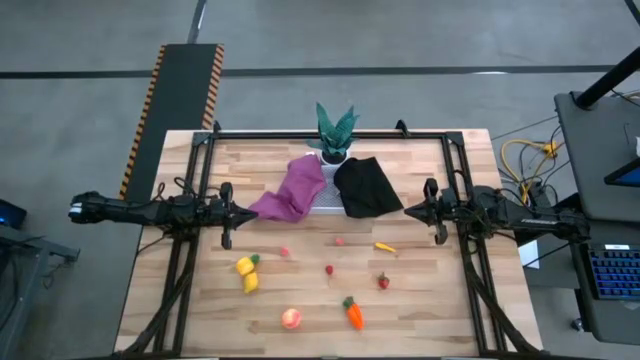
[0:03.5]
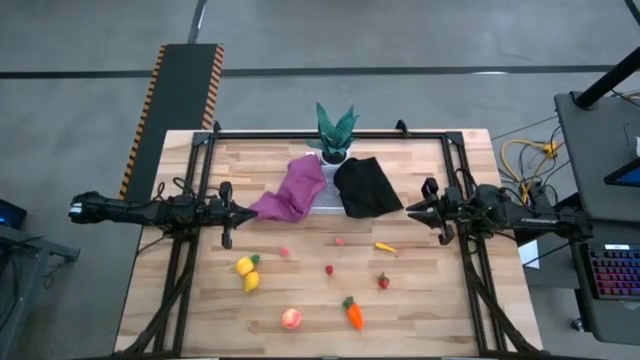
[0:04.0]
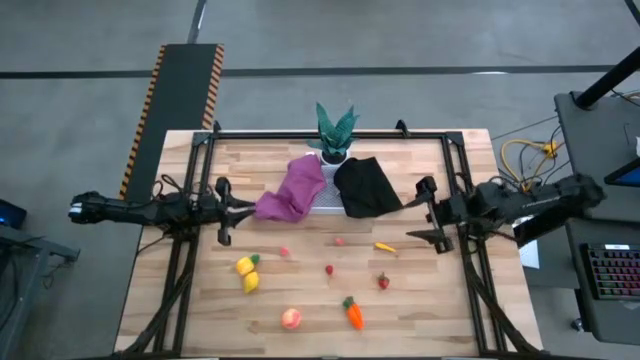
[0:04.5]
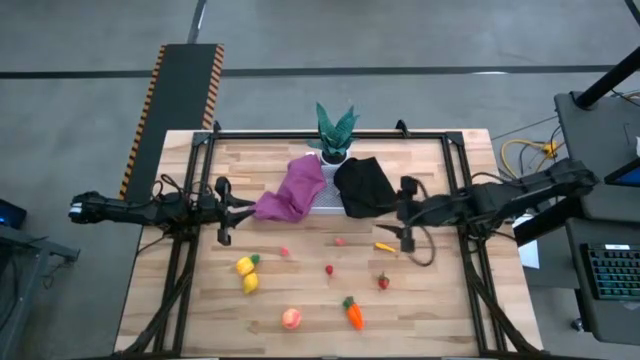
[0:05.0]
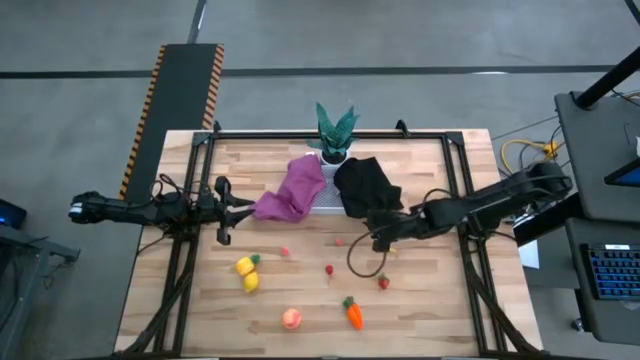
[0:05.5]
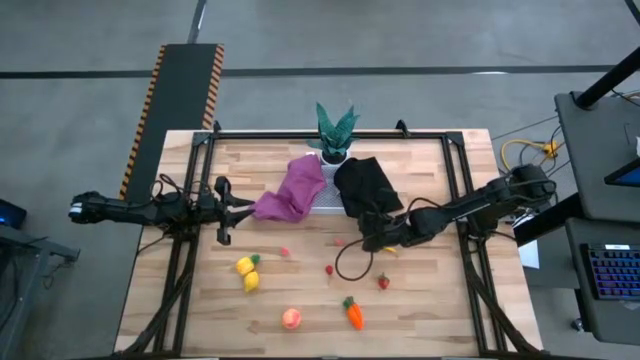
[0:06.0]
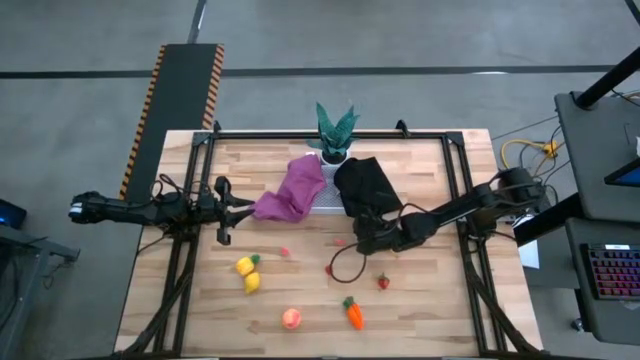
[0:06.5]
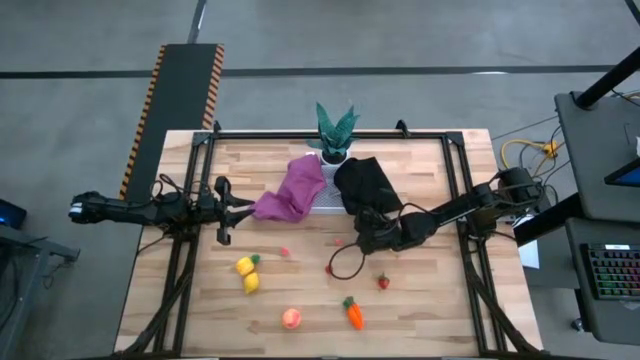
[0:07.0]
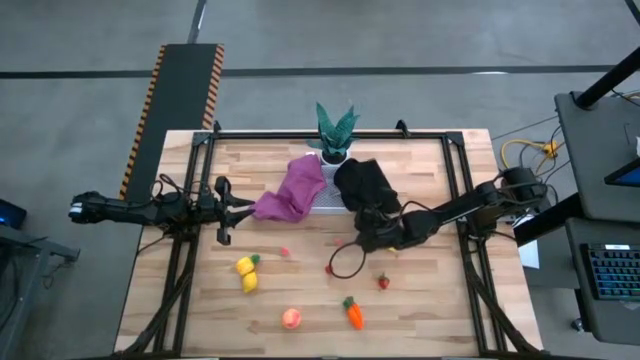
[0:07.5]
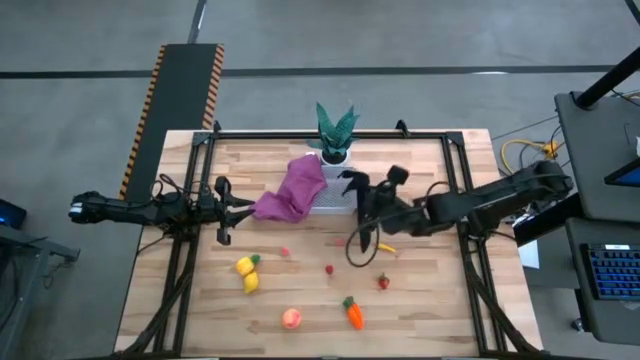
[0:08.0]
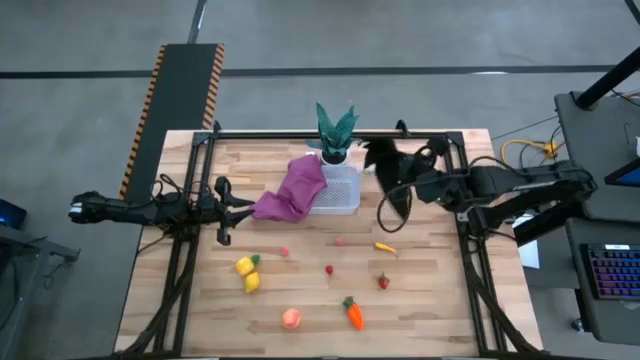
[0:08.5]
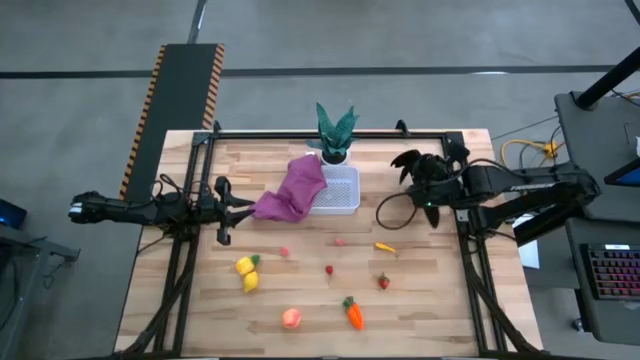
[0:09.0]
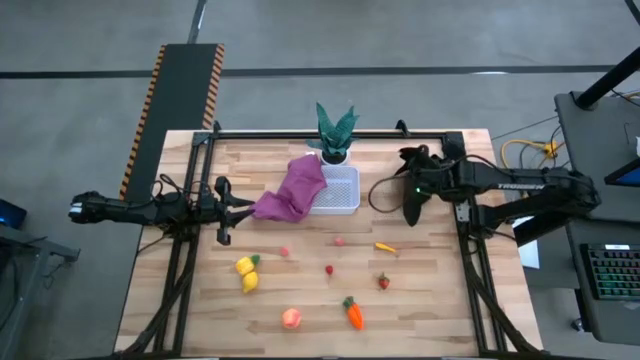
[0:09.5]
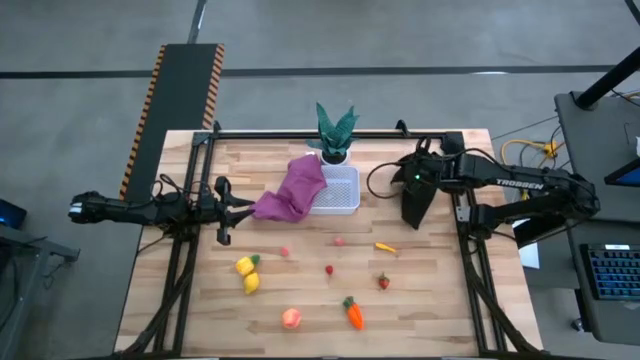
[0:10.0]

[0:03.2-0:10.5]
Task: Build produce basket
Remove the black towel from the white basket

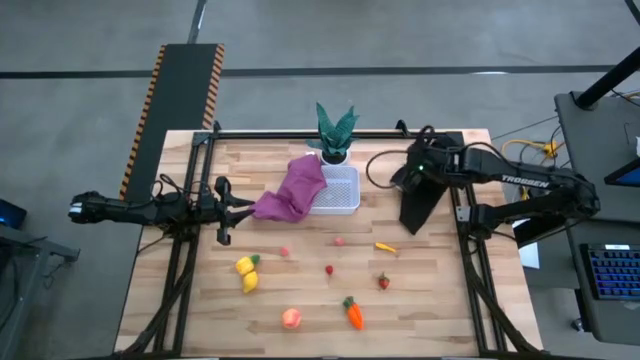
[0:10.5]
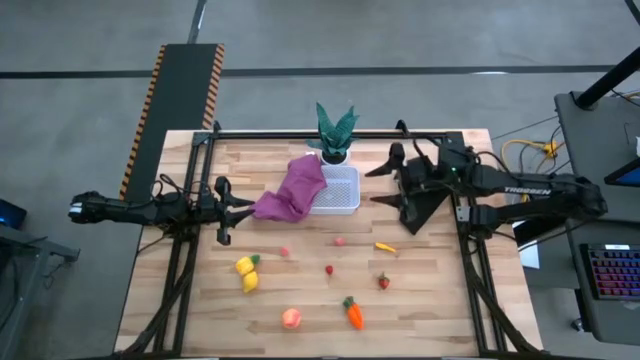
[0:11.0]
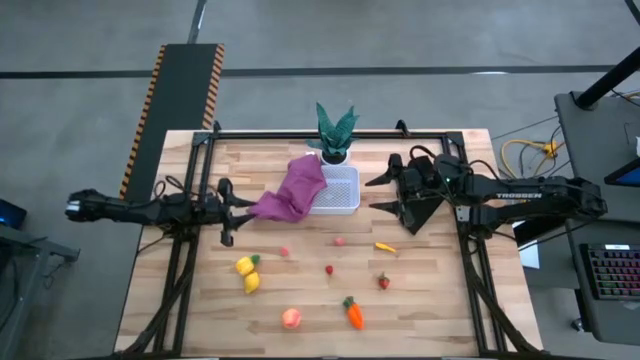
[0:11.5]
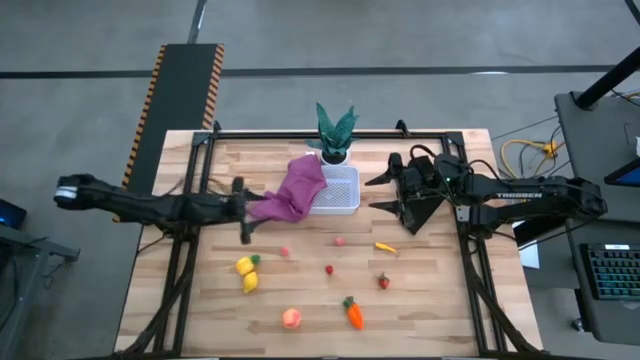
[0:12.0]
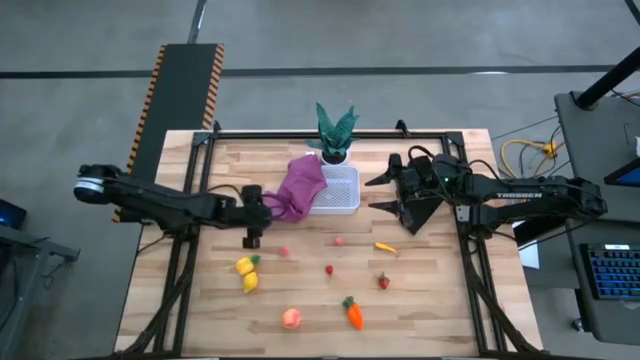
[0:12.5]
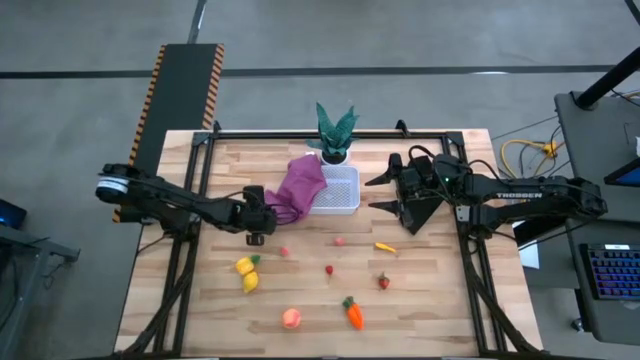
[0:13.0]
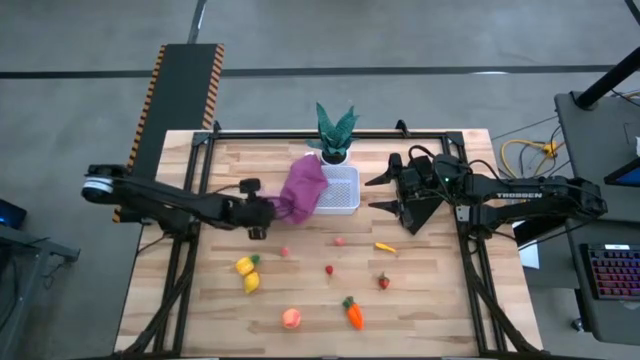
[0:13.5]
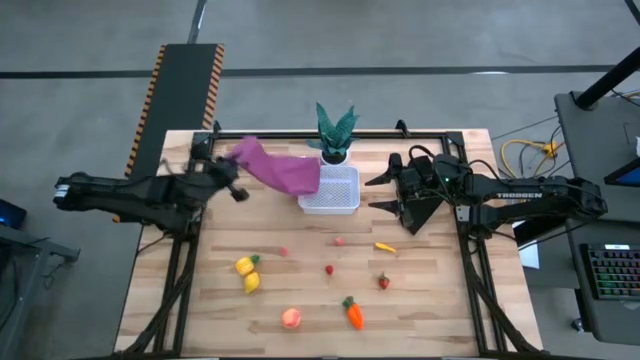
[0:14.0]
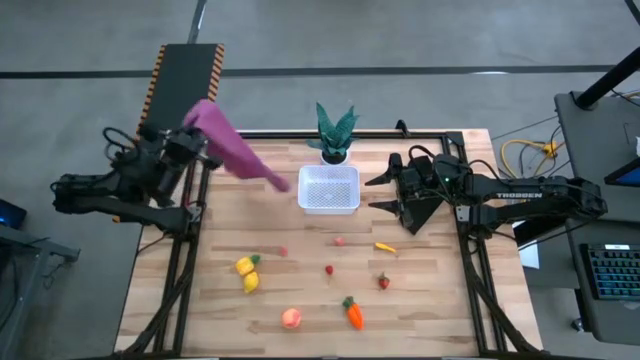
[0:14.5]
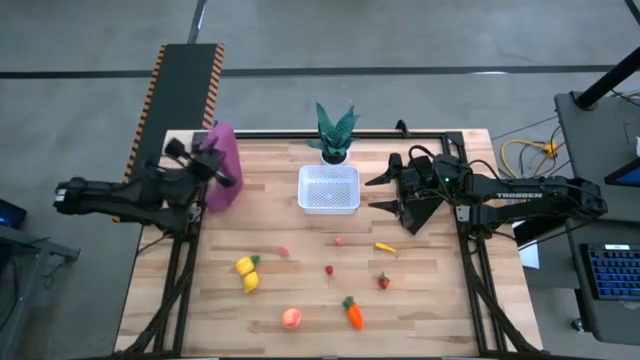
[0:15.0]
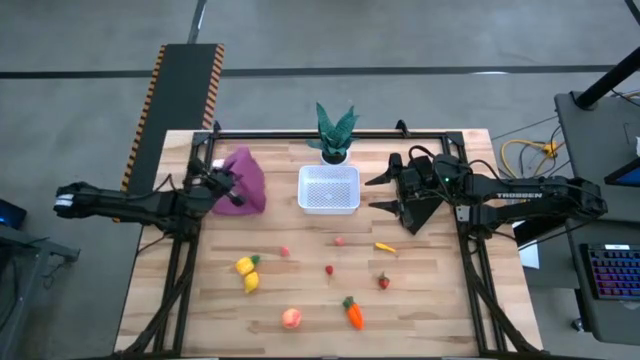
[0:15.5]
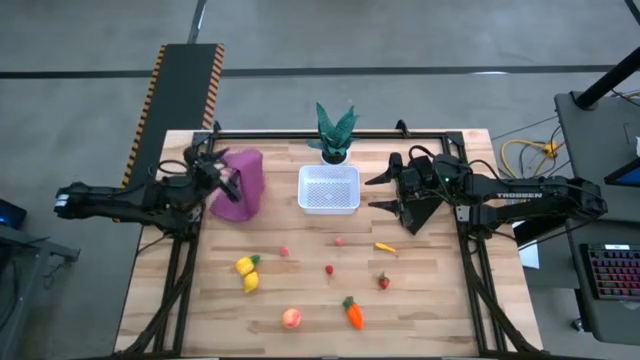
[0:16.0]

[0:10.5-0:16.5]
Remove the purple towel from the white basket

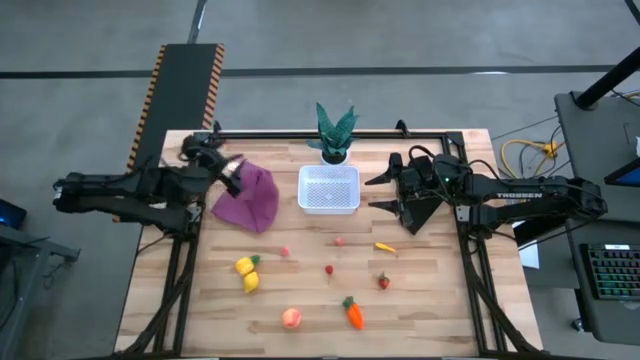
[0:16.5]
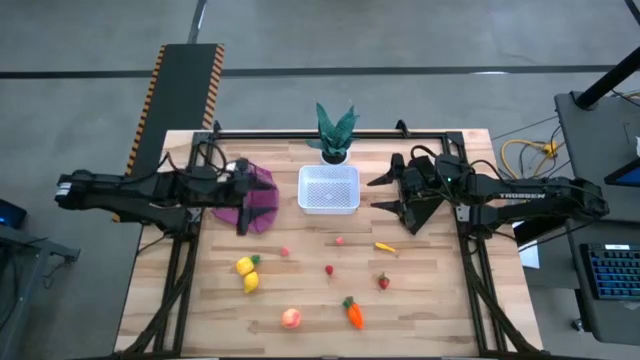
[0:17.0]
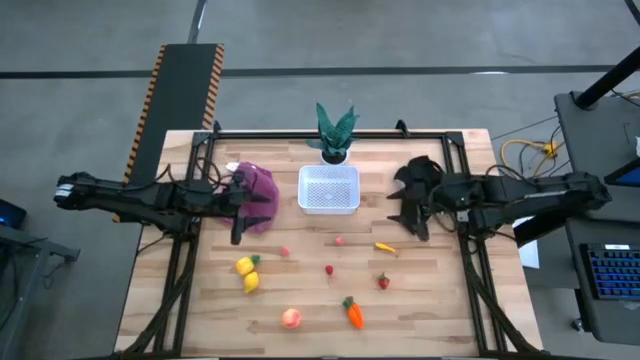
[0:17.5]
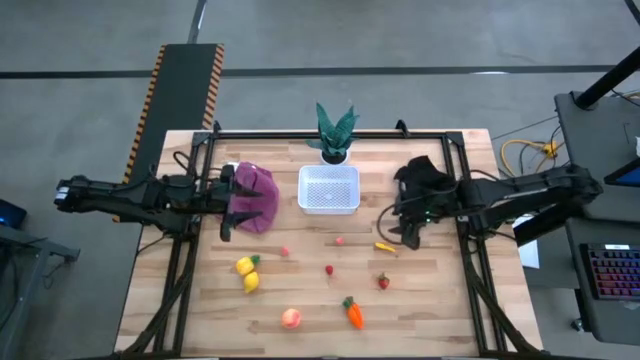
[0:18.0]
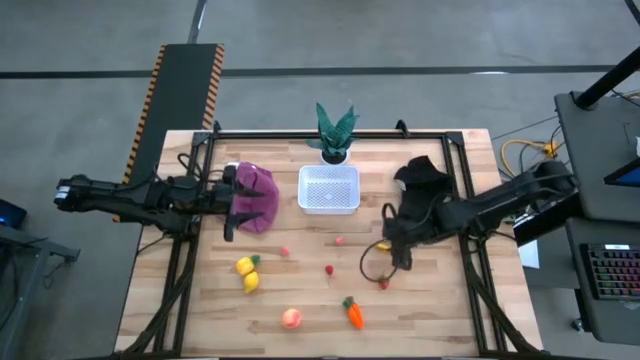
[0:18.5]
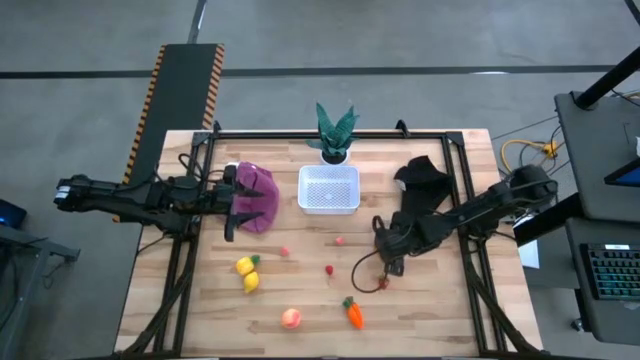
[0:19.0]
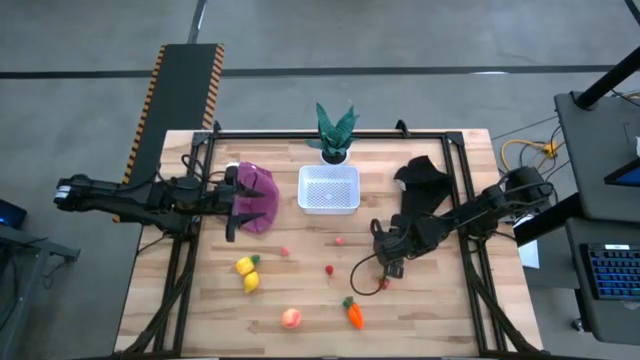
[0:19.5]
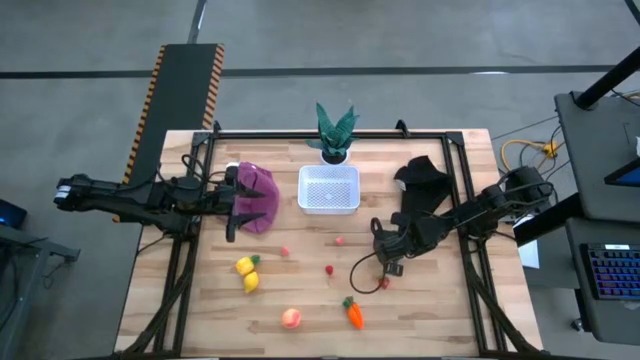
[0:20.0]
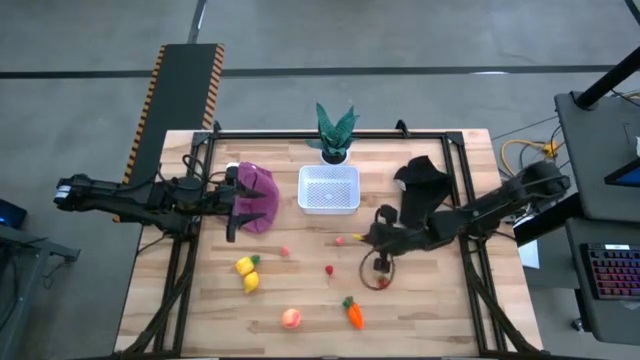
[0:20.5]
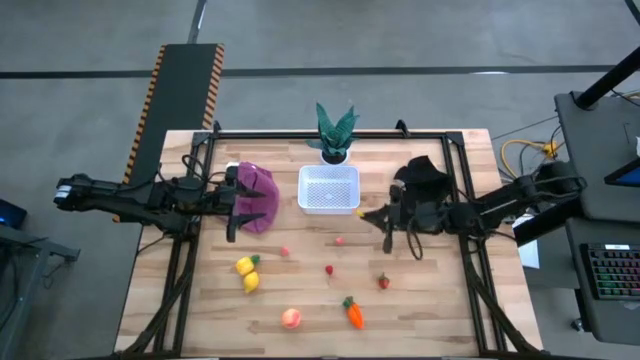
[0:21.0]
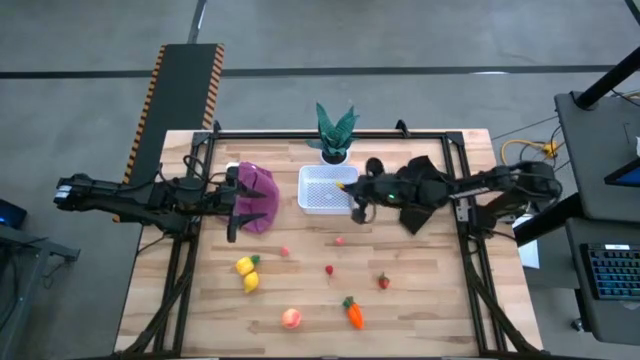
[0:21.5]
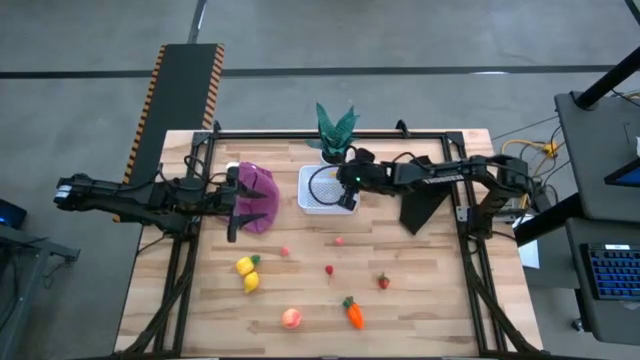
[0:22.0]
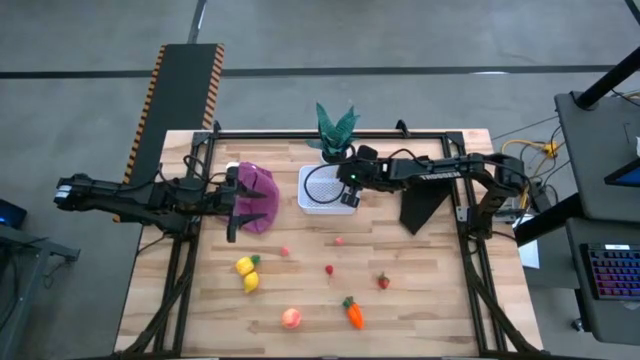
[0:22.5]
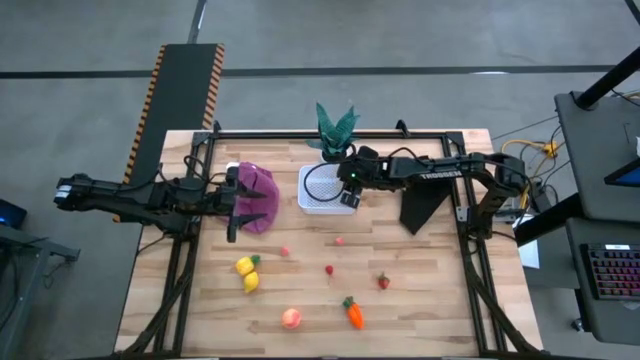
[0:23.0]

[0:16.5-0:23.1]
Put the corn into the white basket

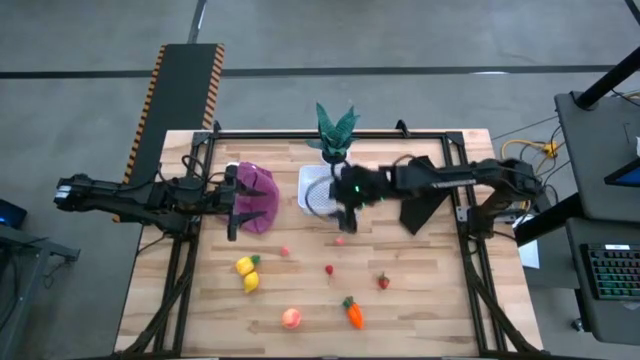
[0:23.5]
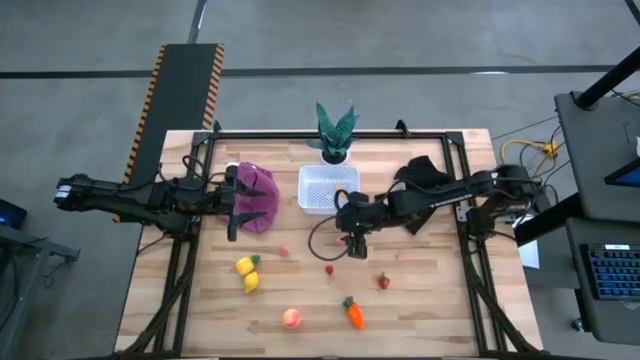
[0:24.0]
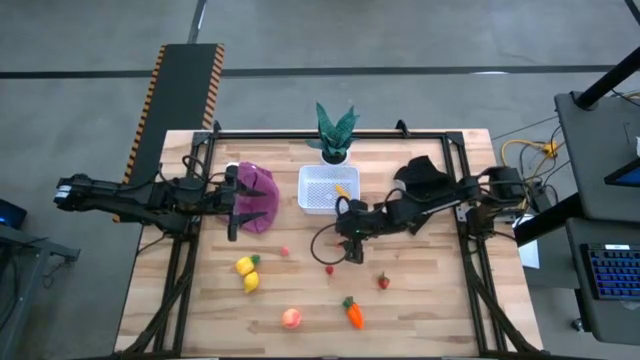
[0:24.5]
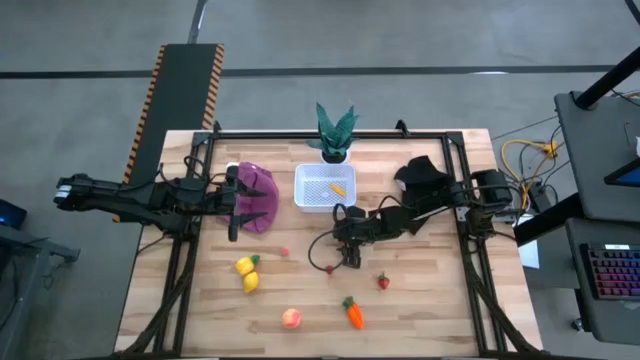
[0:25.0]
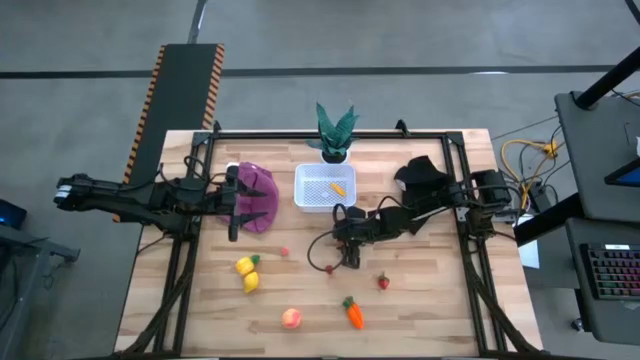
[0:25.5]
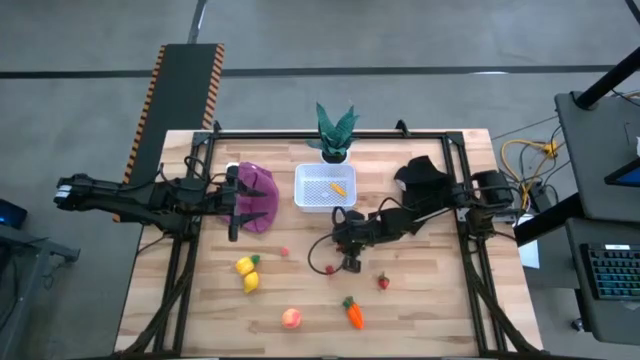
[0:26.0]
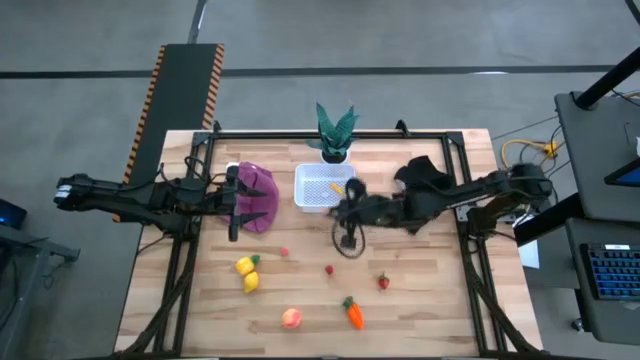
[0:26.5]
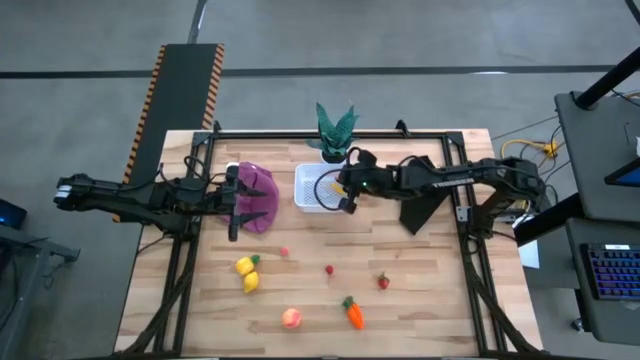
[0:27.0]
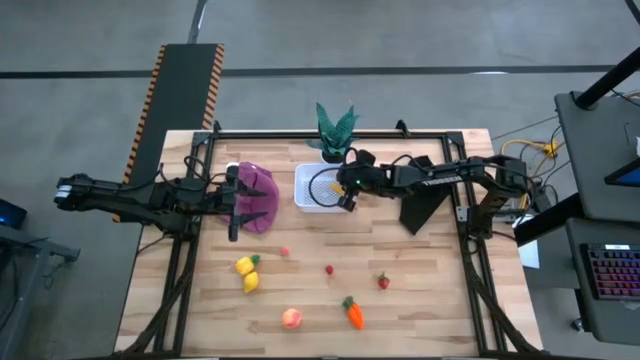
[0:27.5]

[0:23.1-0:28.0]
Put the right apricot into the white basket
